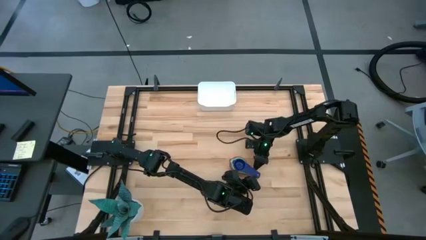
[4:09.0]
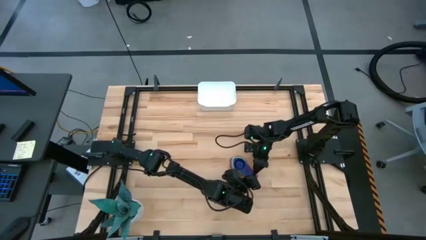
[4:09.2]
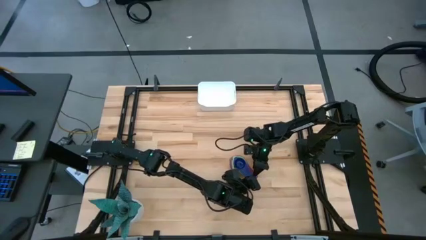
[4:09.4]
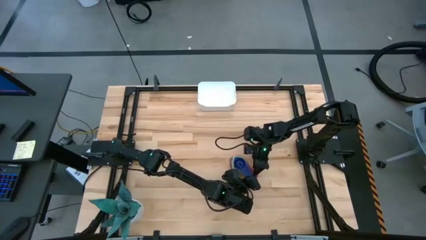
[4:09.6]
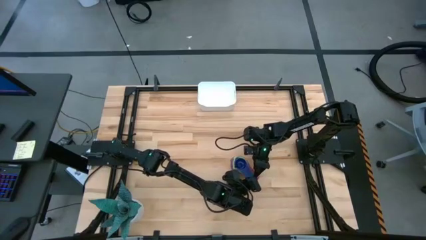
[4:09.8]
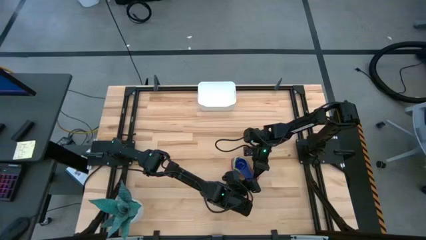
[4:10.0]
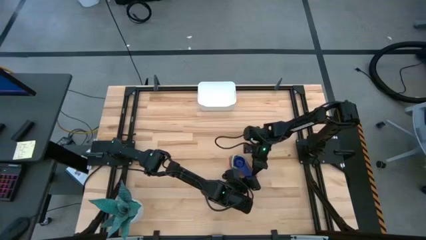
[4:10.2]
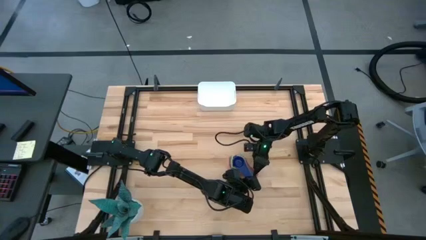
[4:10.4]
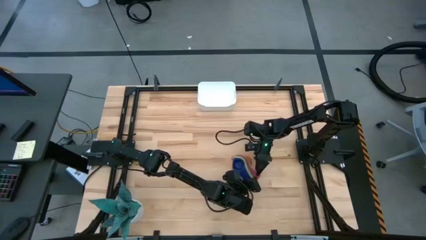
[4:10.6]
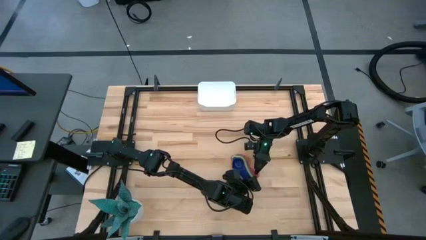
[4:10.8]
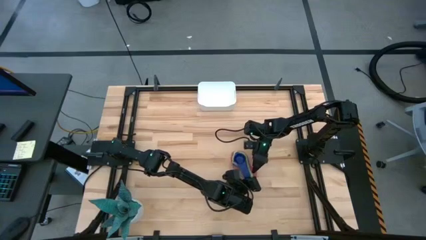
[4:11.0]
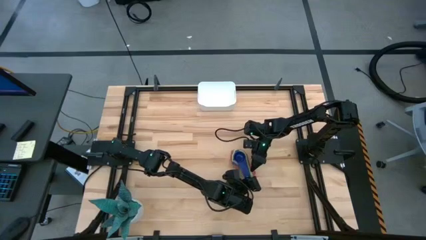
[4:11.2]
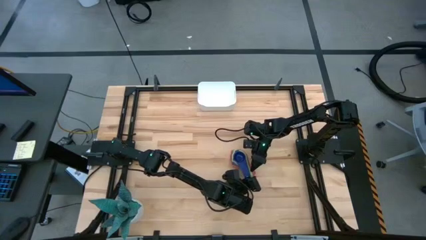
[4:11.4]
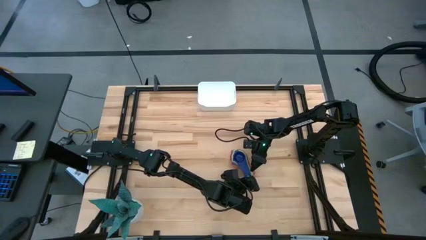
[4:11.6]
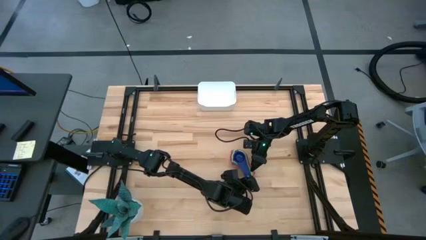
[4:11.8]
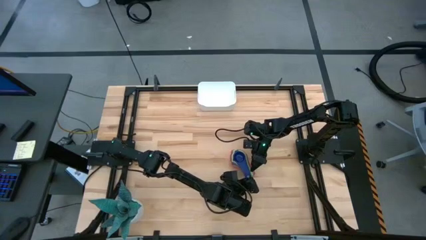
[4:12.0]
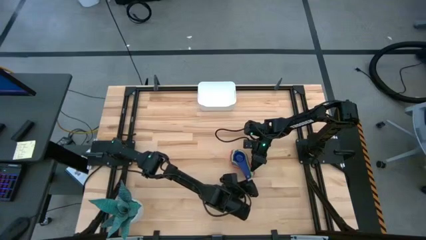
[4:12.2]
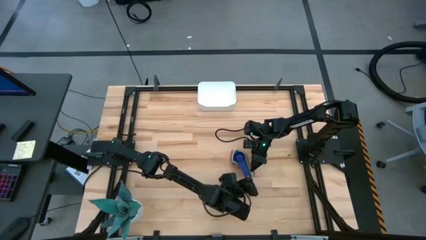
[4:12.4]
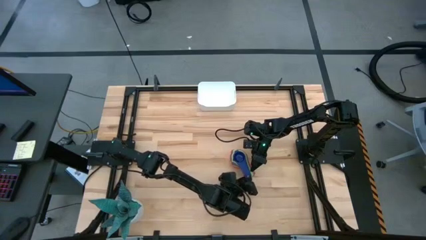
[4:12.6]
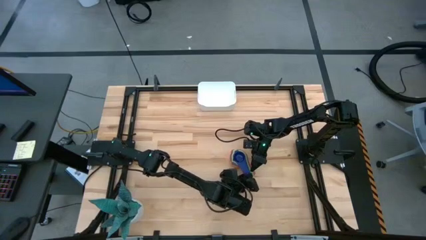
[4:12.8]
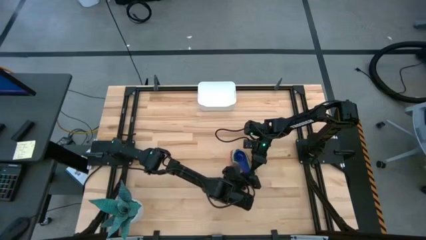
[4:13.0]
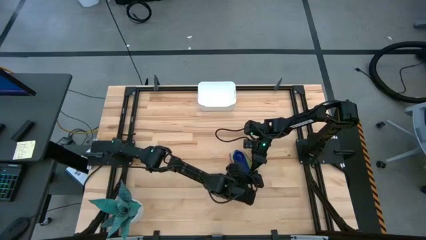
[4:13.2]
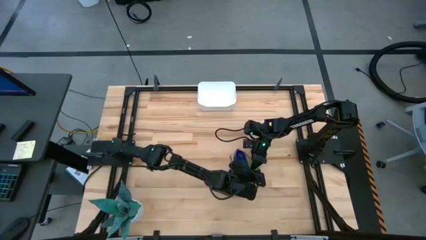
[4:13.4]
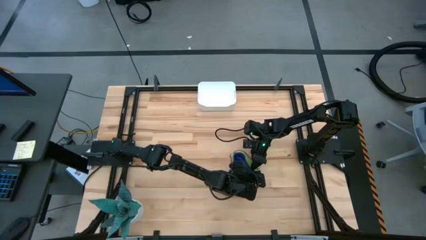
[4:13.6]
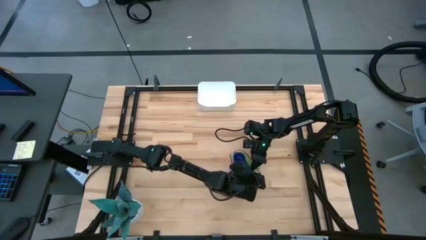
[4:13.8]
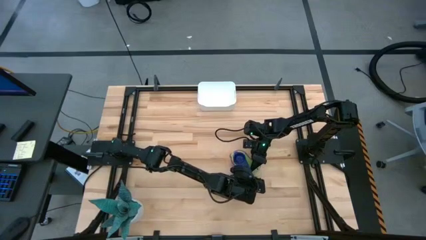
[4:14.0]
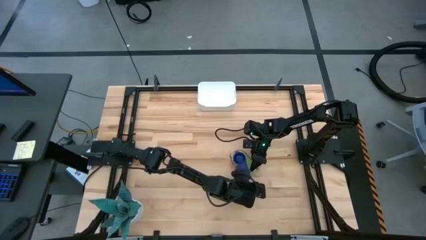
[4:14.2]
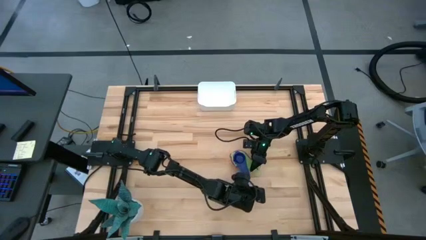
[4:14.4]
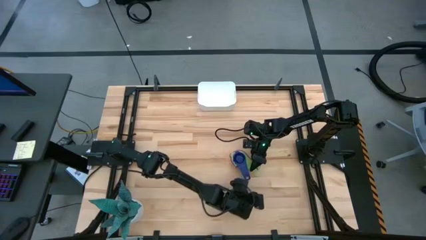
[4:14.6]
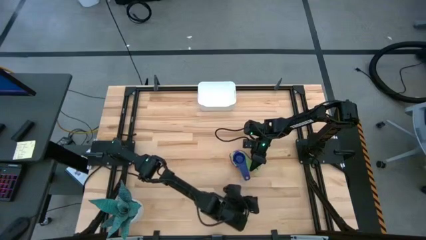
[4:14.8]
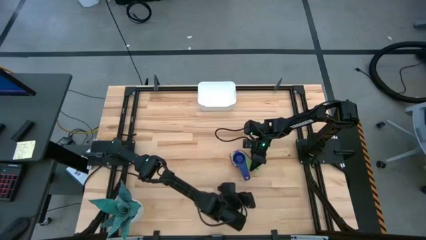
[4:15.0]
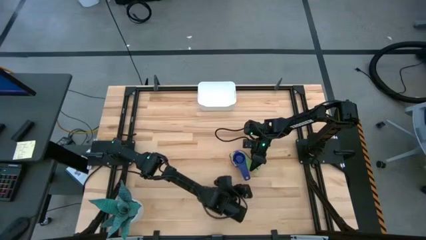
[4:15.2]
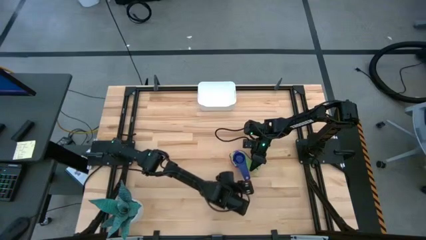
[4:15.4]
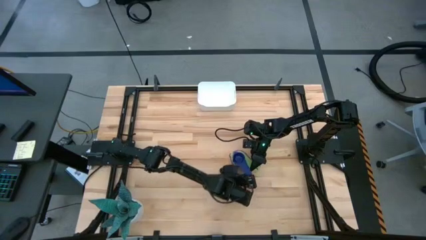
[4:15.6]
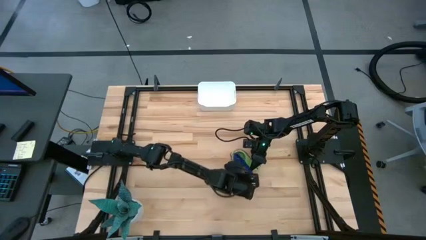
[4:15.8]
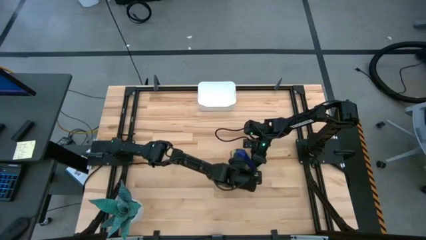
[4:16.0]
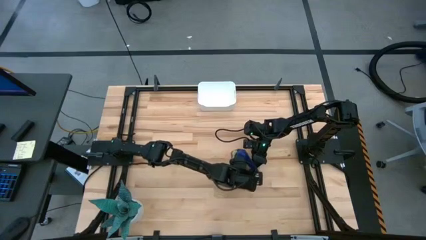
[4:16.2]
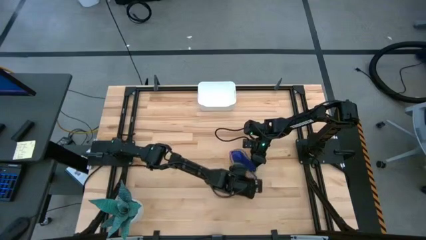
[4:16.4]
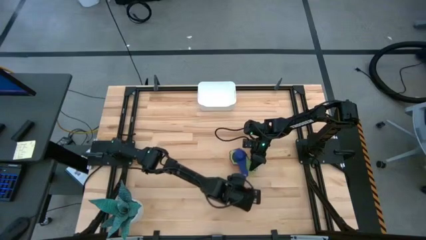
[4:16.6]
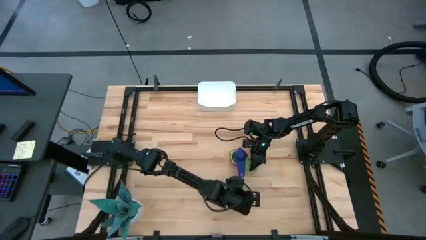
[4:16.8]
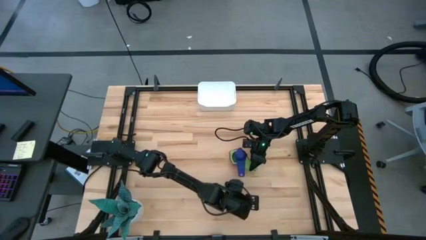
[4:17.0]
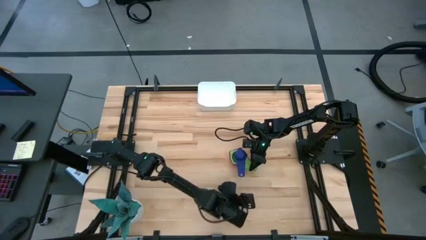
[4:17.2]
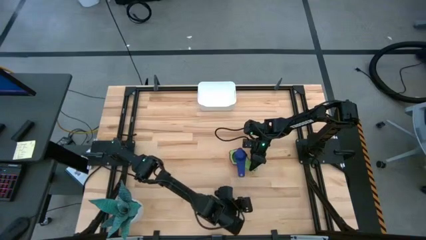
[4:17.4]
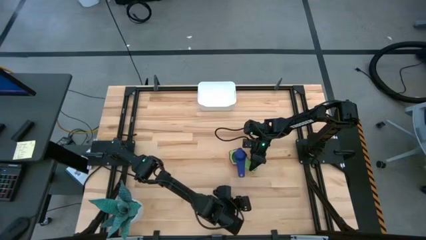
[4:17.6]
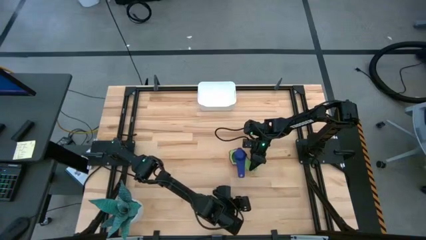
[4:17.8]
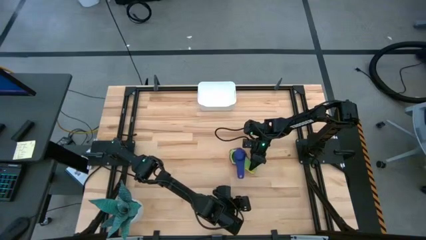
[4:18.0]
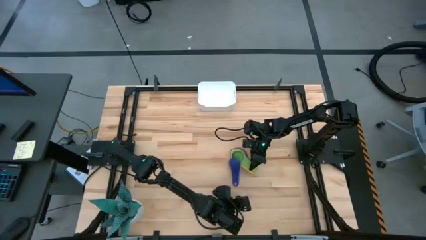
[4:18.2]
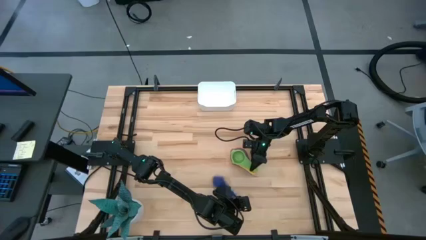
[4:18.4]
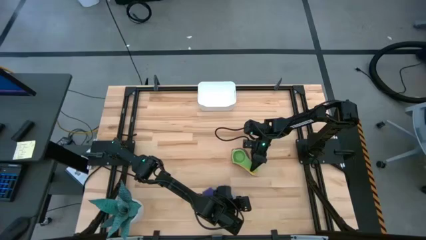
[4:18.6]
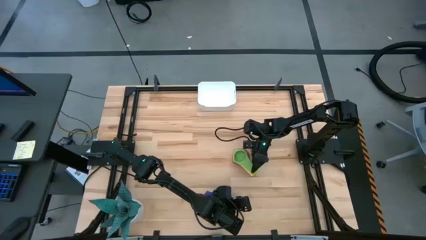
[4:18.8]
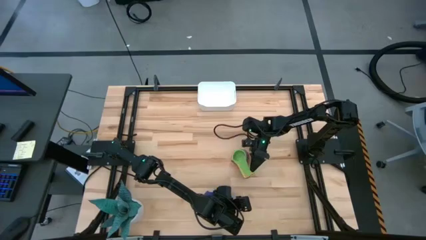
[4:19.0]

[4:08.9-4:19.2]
Task: Nest measuring cups in basket
Put the stacked measuring cups into the white bin

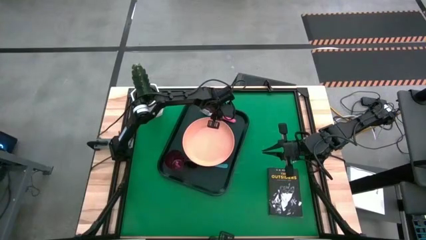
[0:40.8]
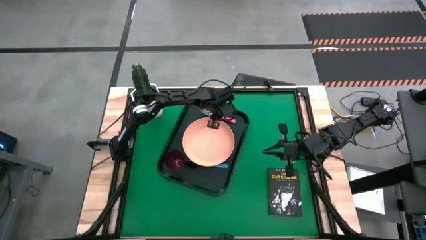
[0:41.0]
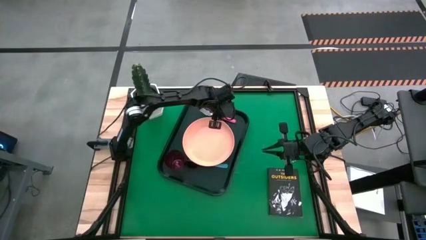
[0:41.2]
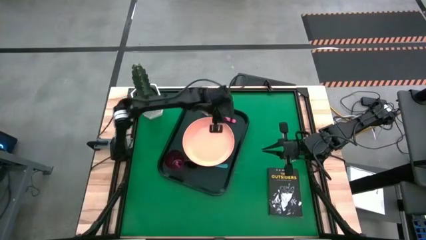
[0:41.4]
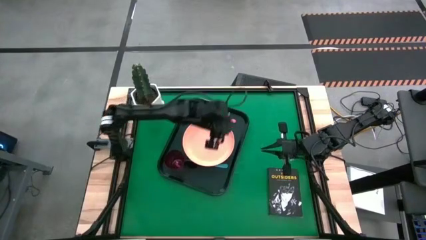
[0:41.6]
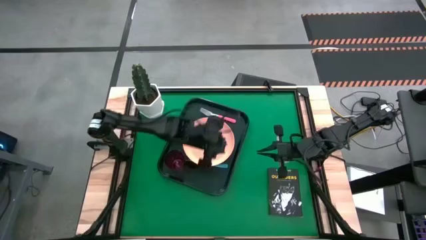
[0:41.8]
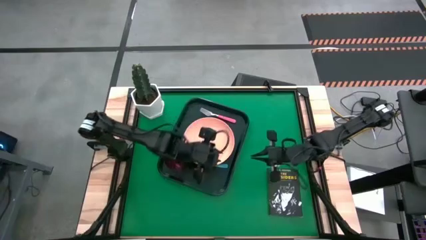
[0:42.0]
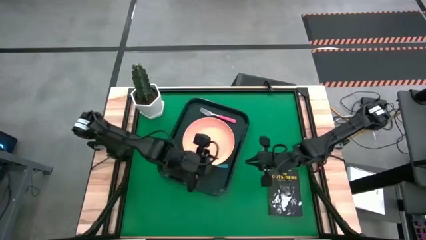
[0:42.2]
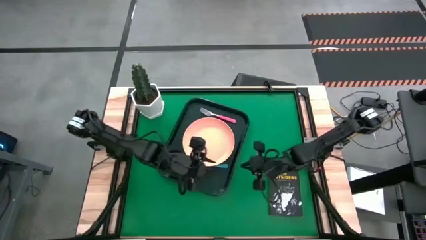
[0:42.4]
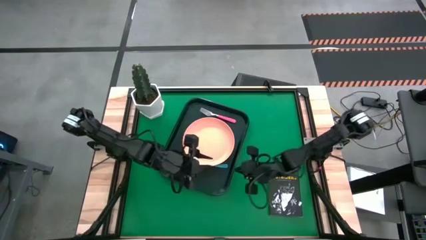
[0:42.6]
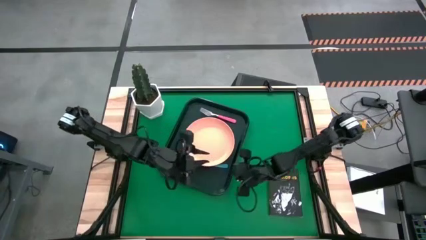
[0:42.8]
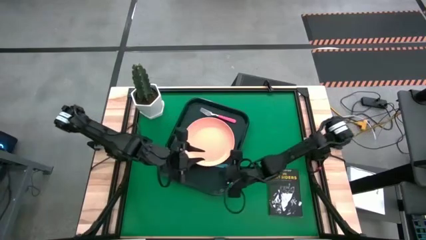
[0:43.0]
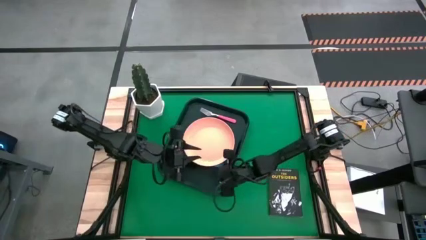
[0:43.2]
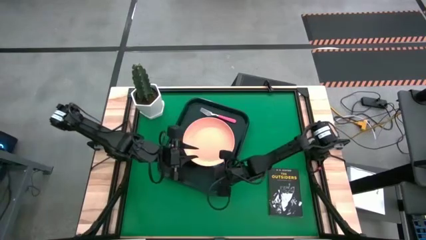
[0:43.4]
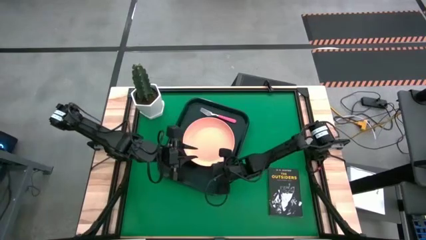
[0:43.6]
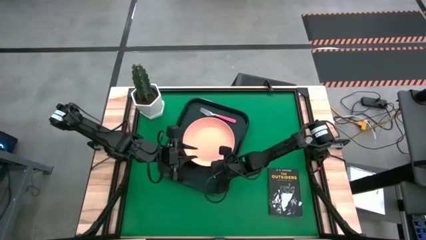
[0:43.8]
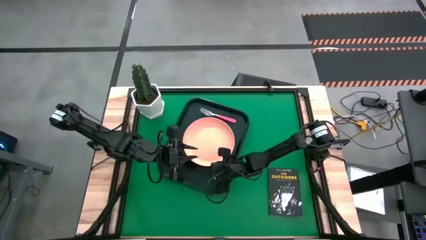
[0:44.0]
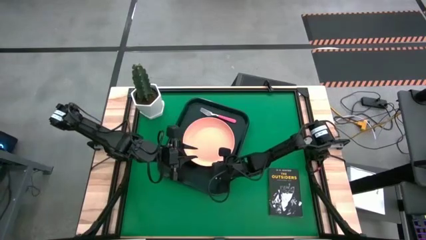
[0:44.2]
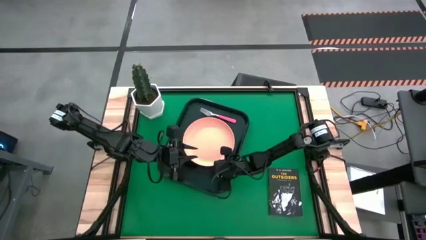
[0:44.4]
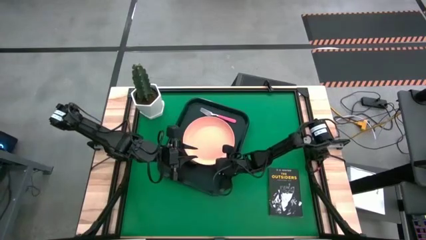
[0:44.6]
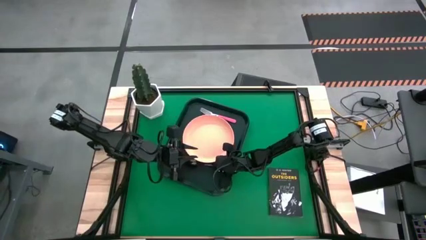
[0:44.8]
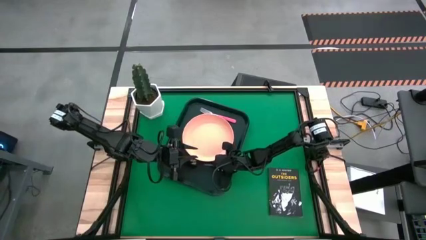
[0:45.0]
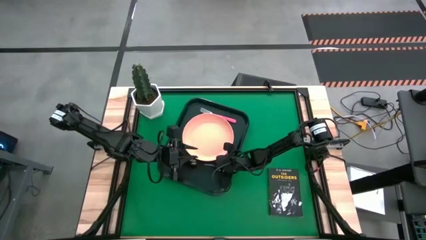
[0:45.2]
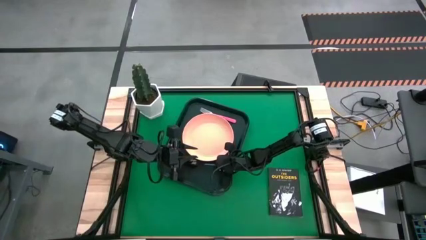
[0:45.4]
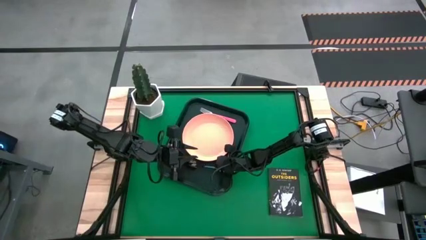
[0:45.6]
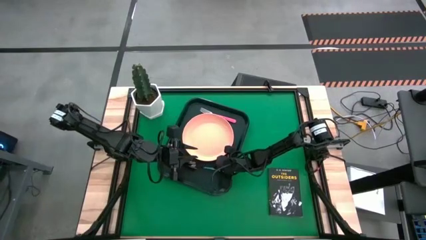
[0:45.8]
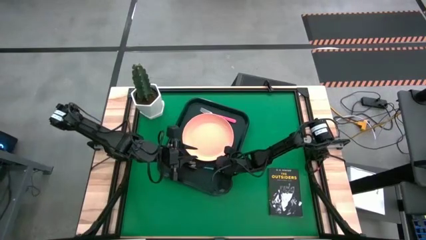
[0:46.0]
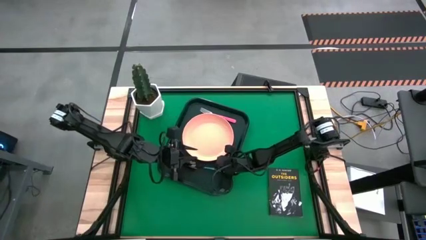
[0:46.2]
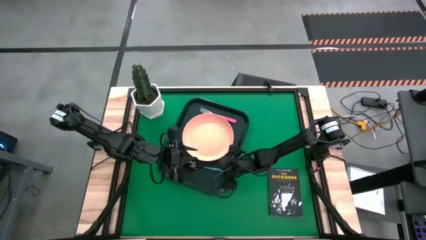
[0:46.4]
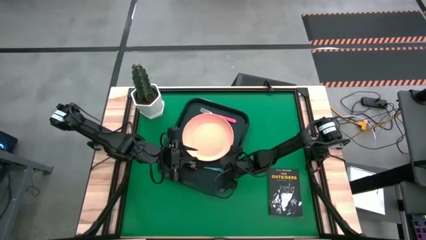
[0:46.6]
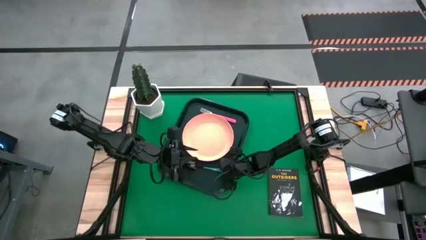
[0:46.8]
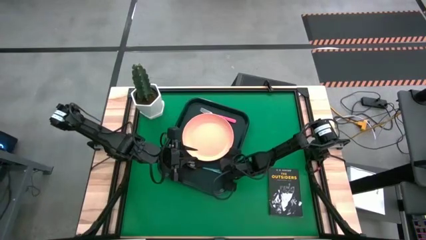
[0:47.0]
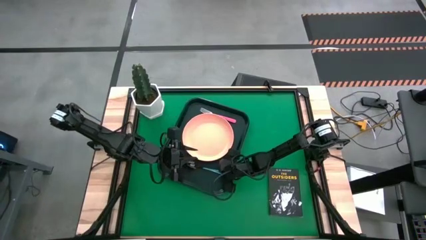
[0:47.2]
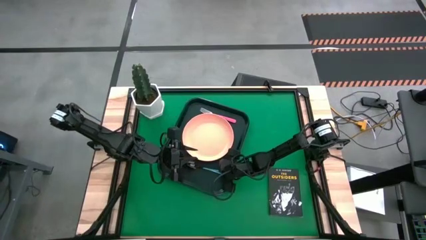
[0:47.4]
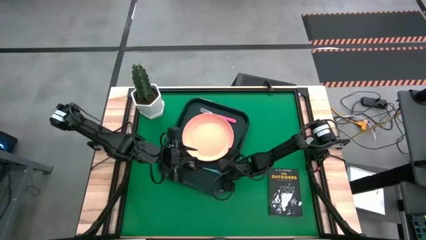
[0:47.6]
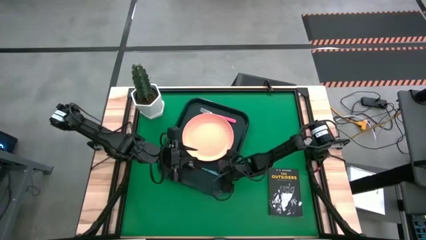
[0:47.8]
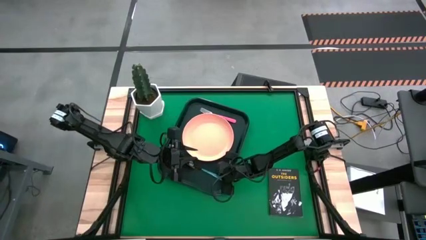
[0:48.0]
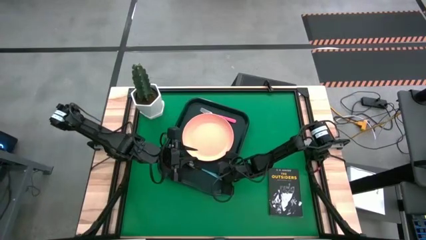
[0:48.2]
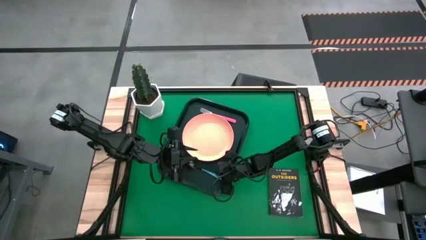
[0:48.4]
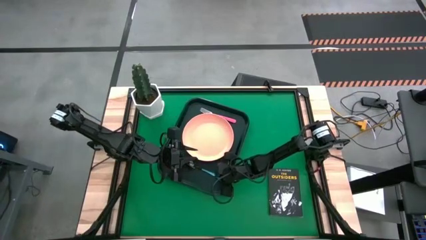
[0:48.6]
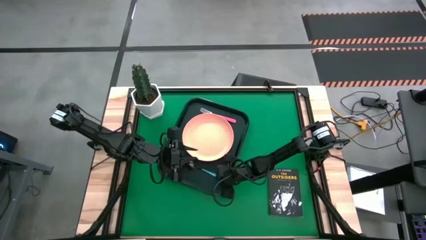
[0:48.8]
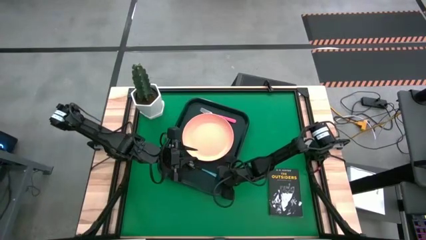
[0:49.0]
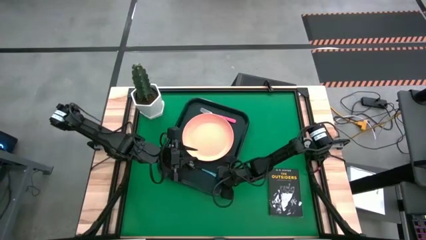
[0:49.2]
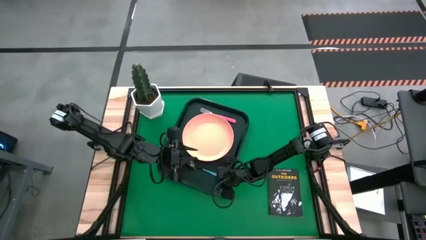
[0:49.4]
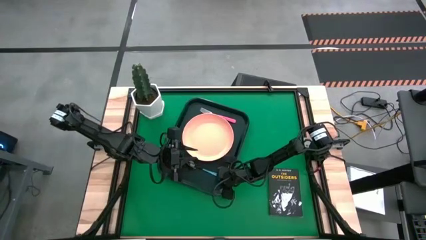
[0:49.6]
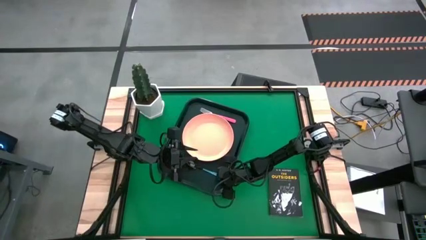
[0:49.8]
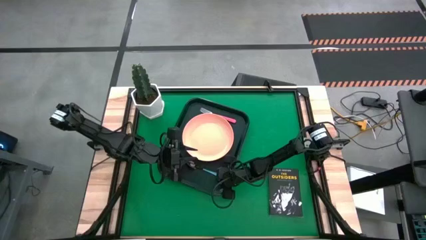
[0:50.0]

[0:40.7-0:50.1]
Task: Pick and place plate/cup/fork/spoon on tray
Adjust the blue spoon
